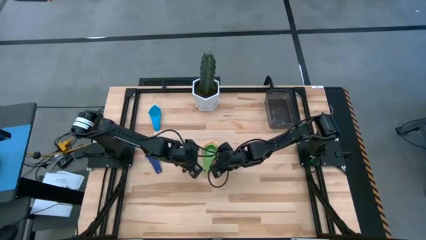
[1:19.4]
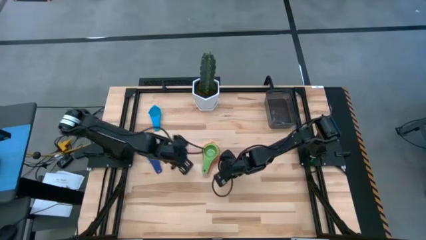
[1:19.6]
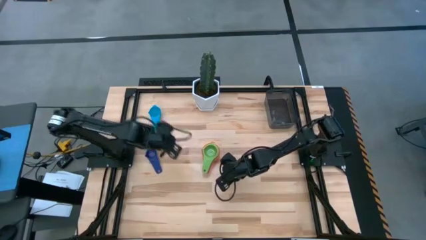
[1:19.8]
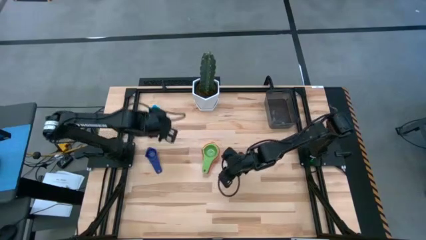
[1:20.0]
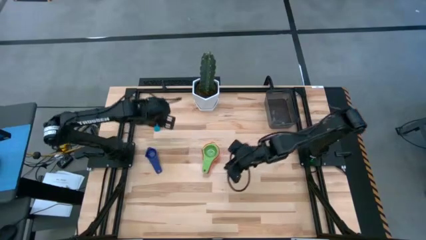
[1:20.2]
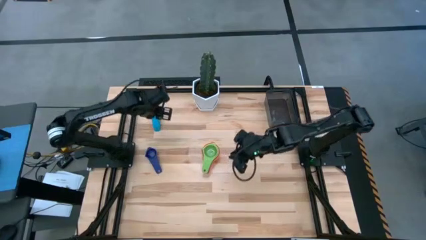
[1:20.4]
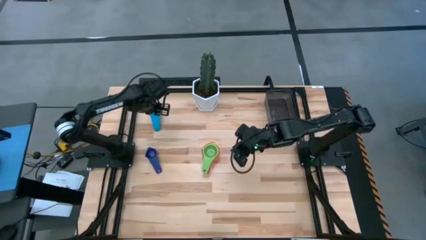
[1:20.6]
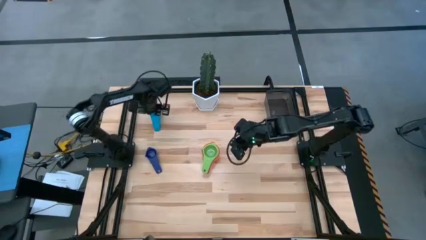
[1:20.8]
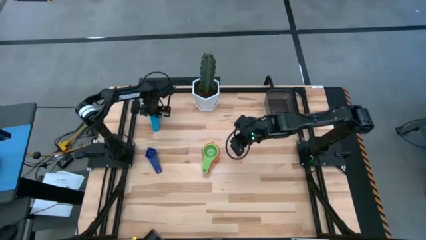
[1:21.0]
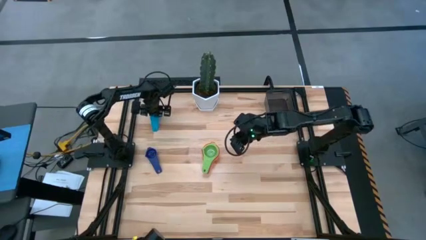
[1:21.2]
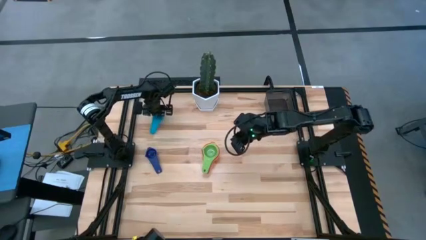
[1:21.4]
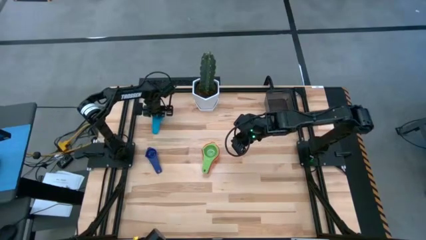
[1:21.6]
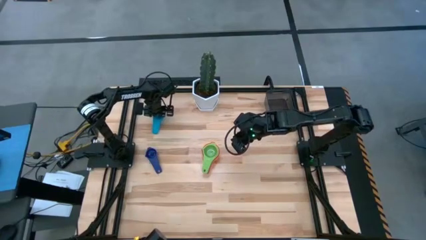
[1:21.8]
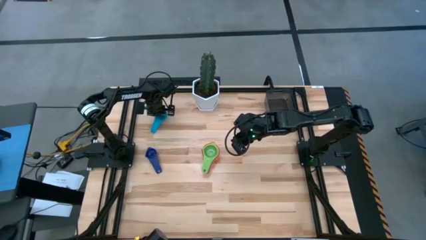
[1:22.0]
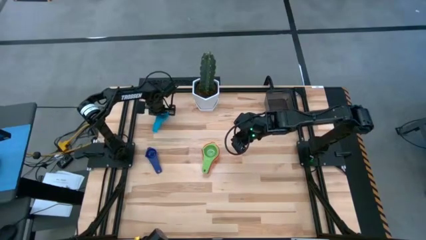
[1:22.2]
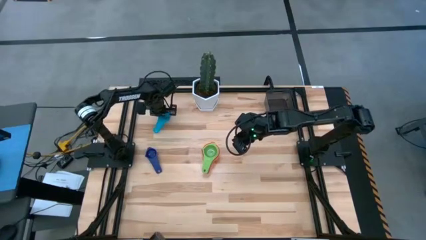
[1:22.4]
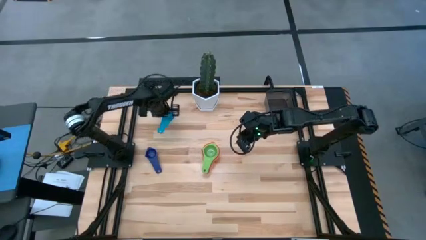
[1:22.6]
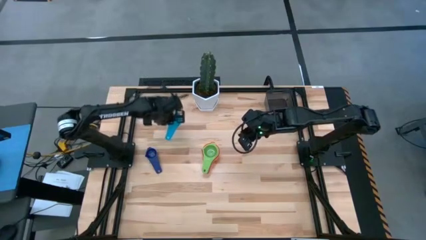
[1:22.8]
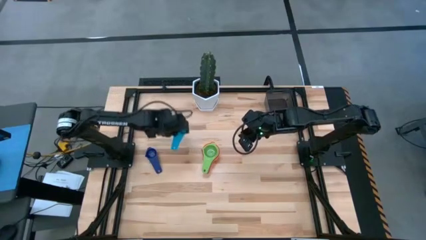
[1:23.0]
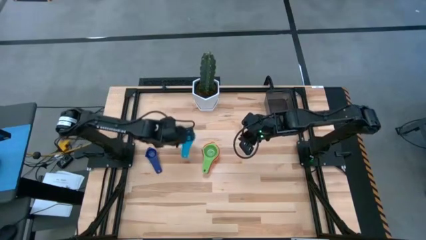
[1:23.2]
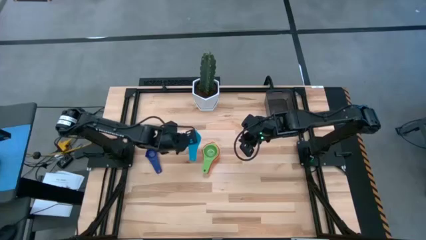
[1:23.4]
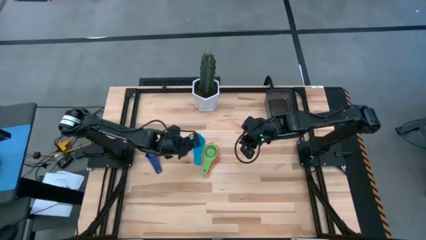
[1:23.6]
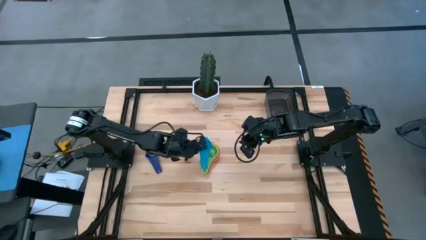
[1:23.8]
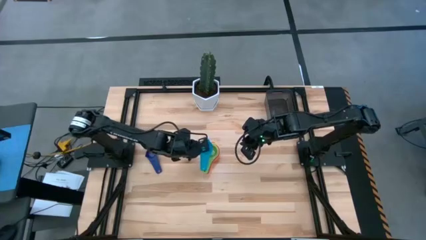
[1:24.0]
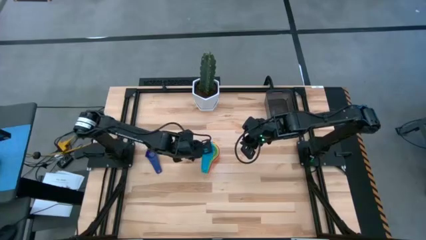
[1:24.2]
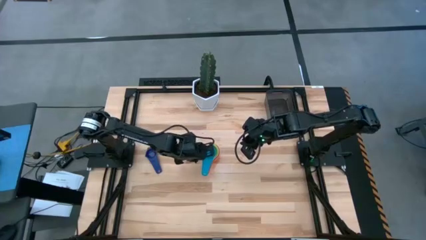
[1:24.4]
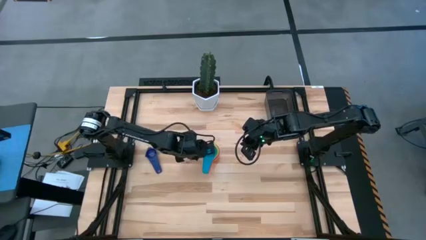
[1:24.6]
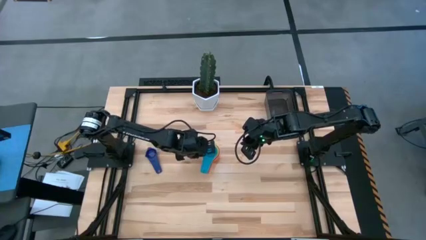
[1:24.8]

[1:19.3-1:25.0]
Task: Nest measuring cups in basket
Stack the light blue measuring cup on top of the green measuring cup

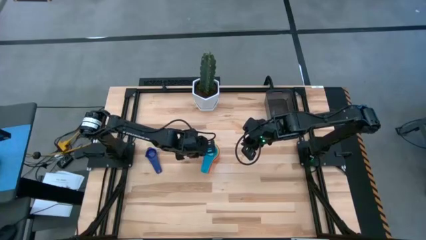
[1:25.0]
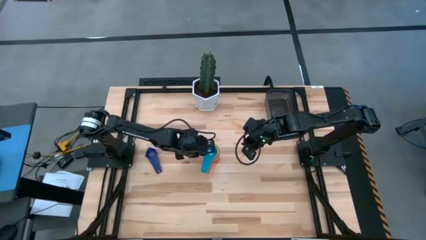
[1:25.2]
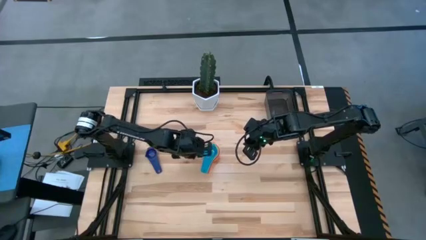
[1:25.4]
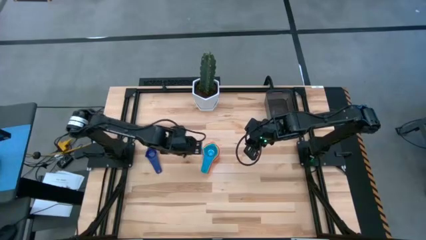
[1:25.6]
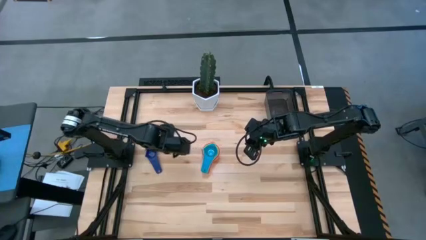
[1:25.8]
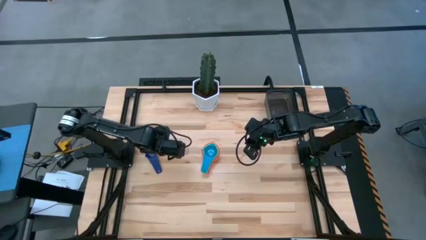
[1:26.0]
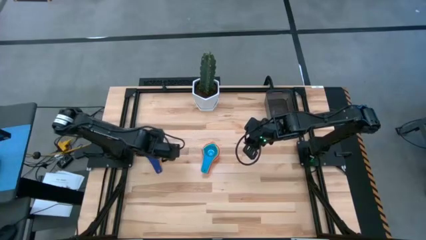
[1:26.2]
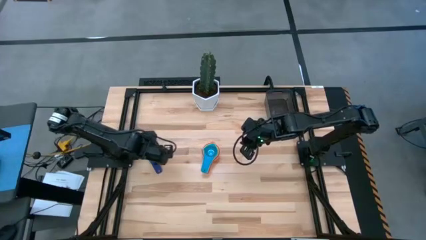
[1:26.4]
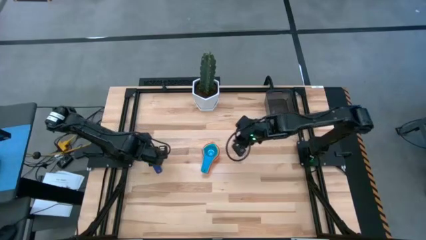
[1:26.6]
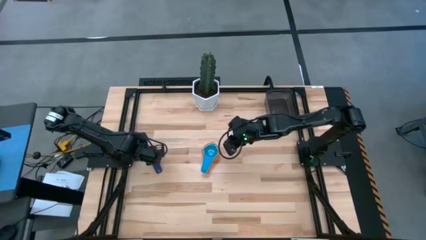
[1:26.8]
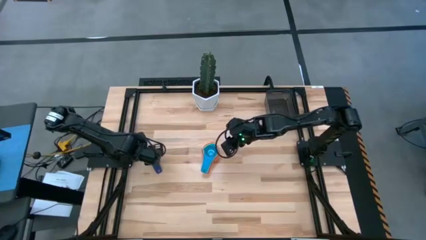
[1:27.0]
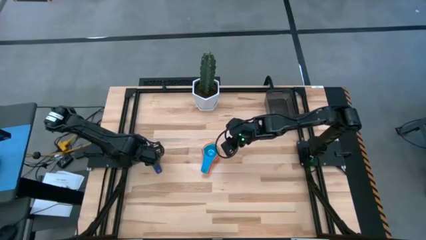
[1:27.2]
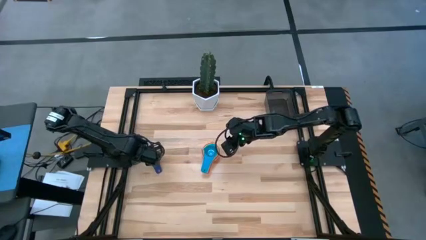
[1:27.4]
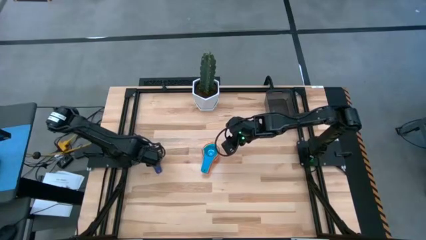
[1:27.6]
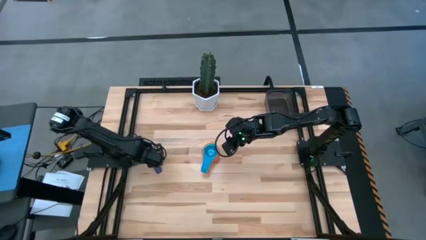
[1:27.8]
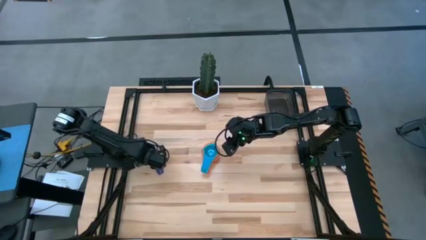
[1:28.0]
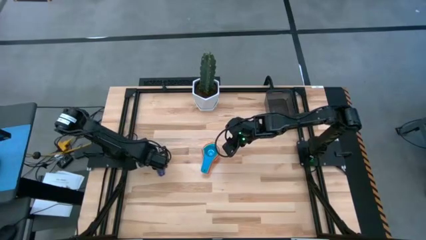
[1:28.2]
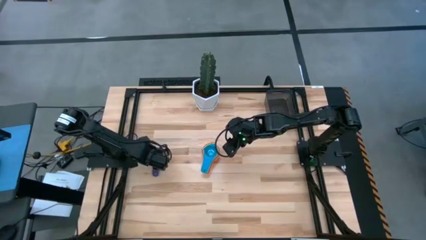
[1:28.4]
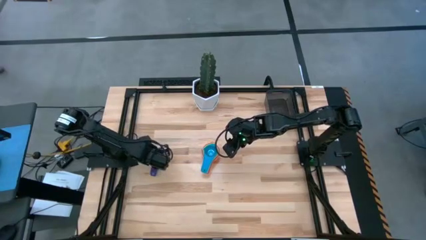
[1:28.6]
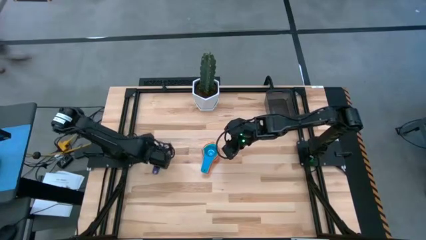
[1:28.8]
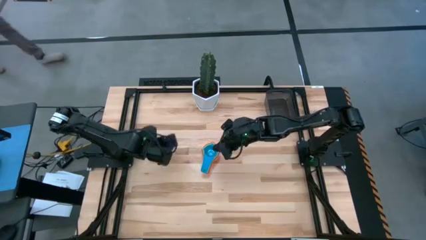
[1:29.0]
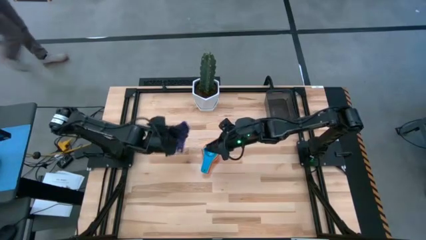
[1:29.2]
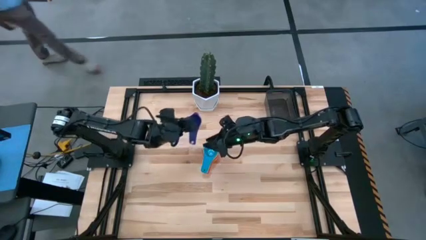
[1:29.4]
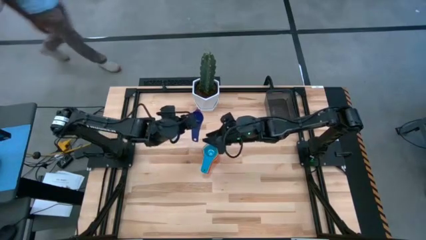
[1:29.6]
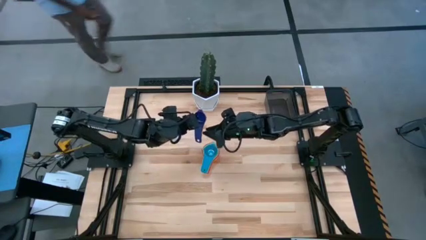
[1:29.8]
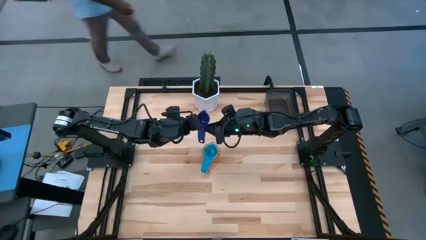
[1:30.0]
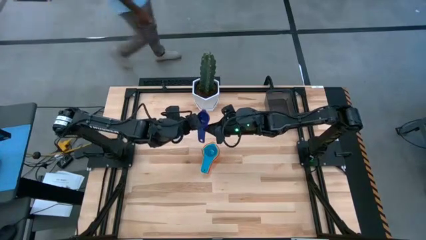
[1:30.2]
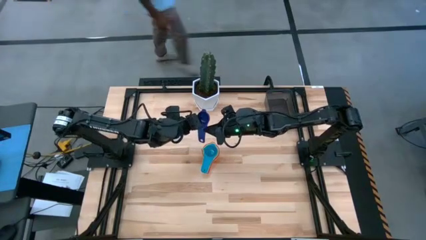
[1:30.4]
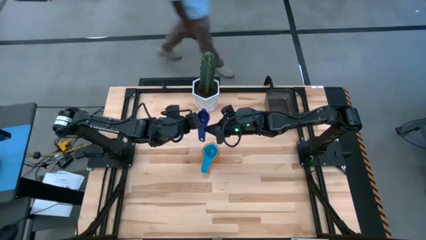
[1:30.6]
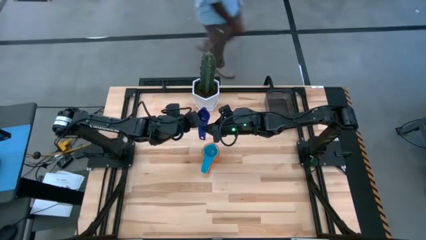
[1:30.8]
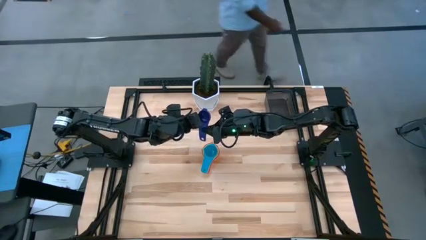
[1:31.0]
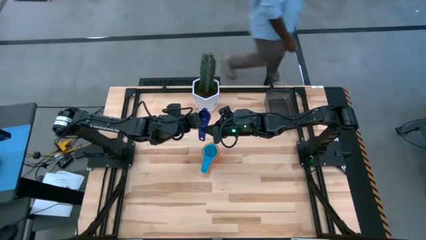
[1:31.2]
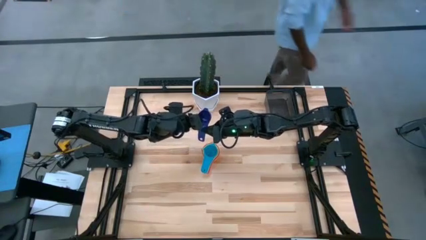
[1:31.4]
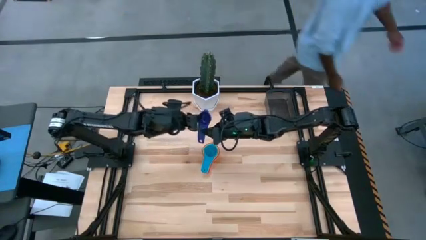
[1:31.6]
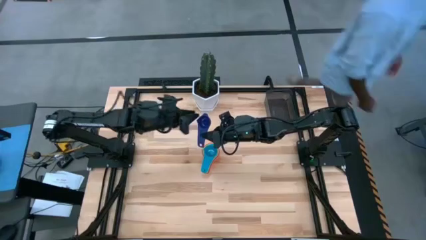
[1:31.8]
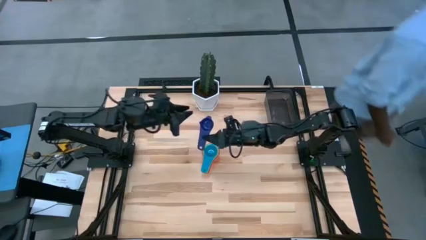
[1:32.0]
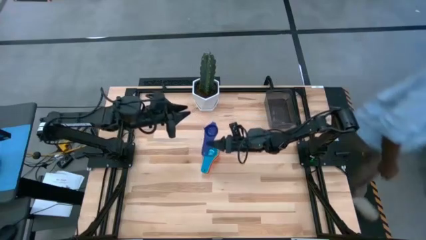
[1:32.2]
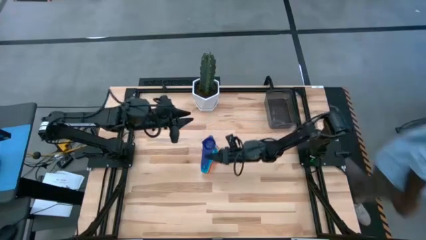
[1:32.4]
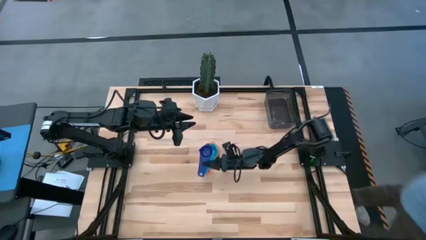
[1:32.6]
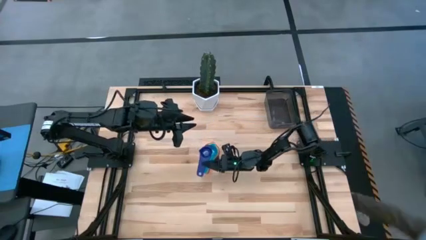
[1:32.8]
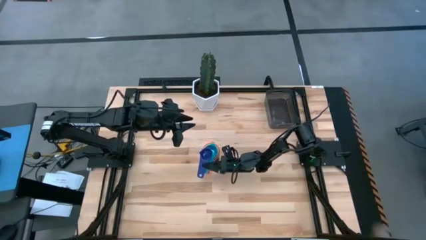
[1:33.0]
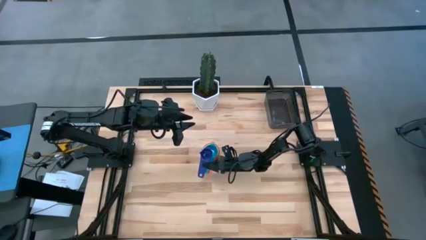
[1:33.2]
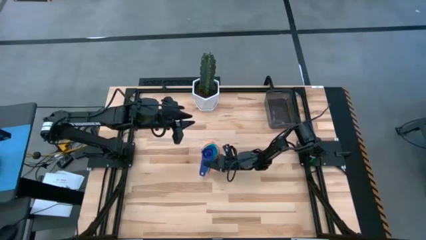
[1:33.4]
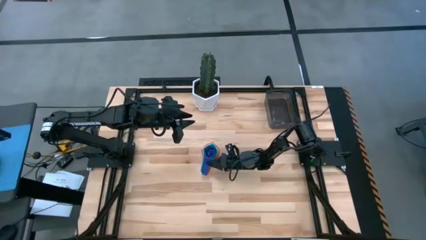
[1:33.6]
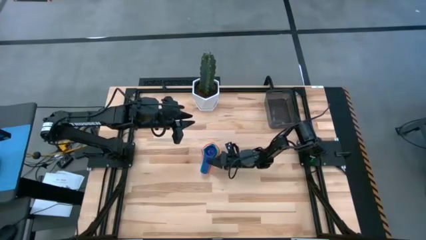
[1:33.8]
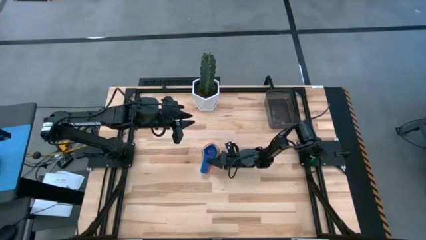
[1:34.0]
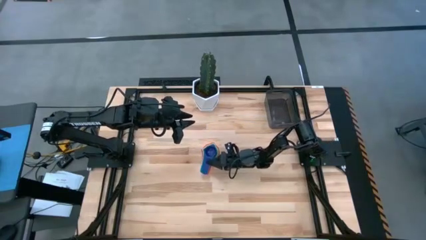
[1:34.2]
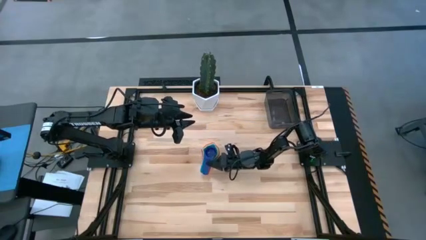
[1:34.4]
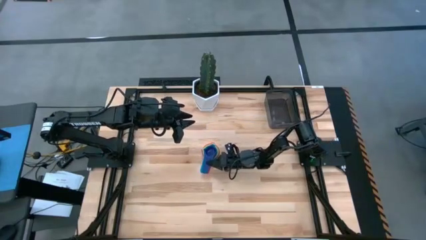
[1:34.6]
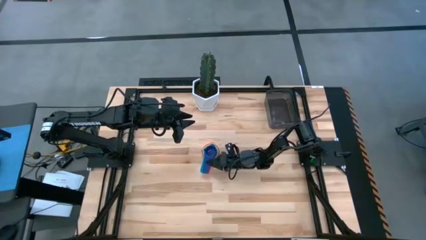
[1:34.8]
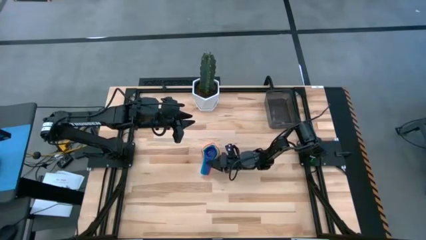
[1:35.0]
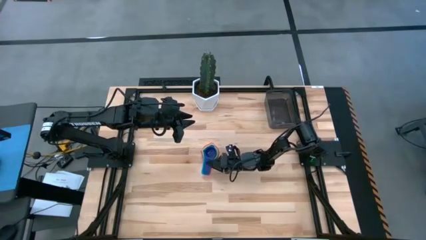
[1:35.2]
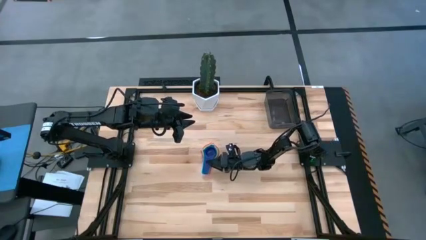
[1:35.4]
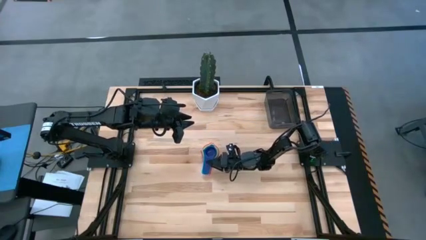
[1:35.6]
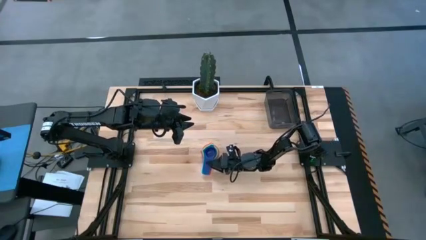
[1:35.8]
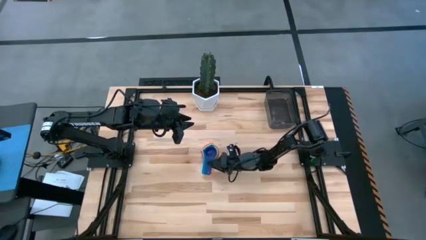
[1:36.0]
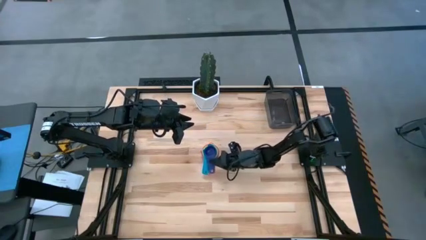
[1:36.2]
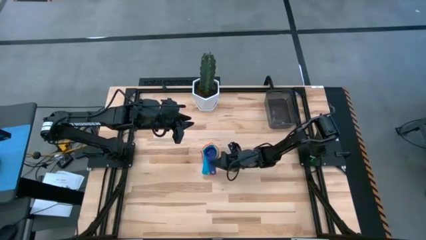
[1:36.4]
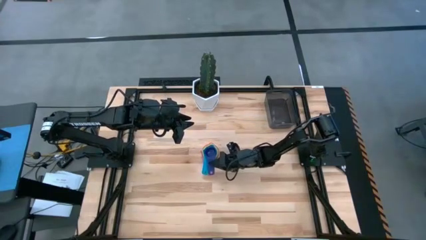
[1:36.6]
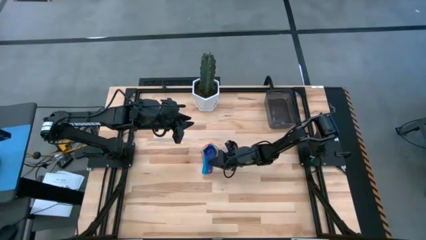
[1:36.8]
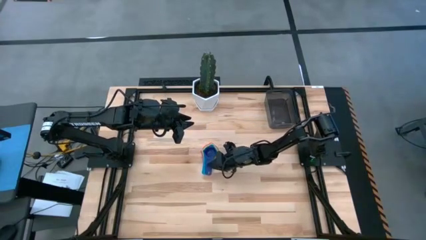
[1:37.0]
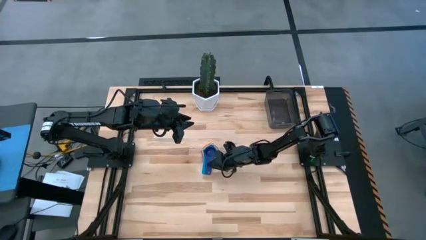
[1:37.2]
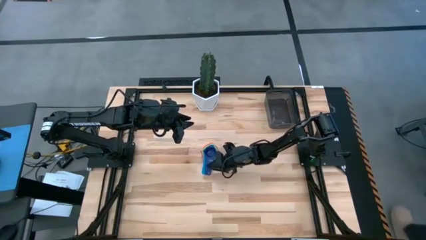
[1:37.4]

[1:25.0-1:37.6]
Stack the violet measuring cup on top of the light blue measuring cup
